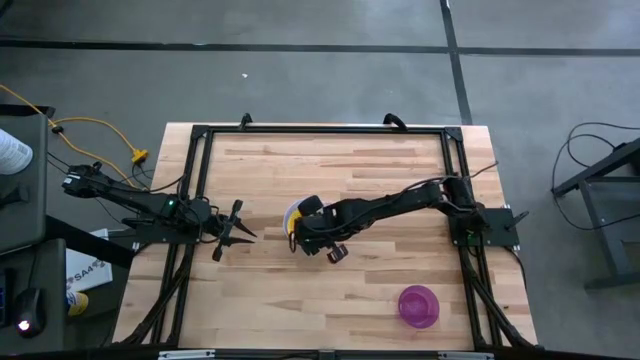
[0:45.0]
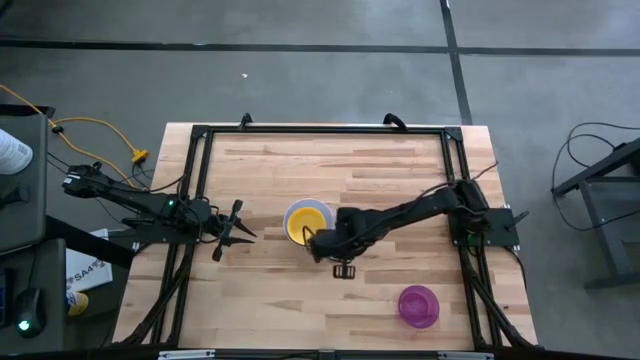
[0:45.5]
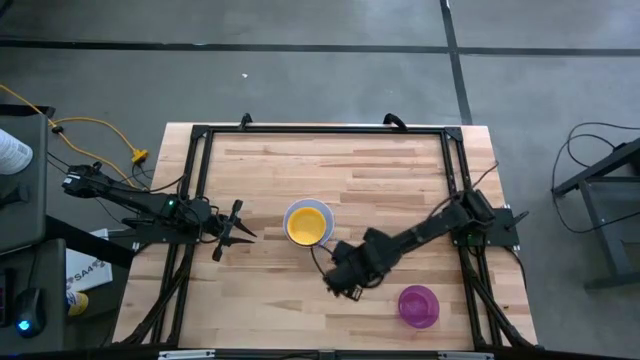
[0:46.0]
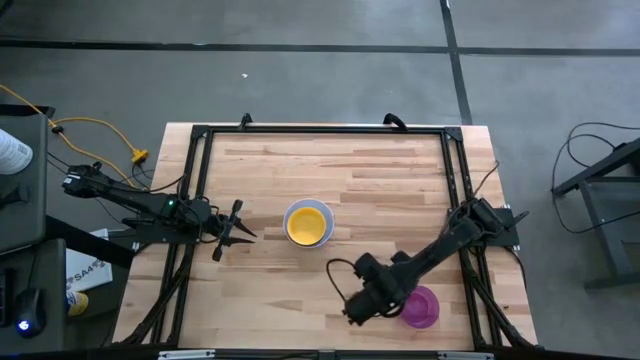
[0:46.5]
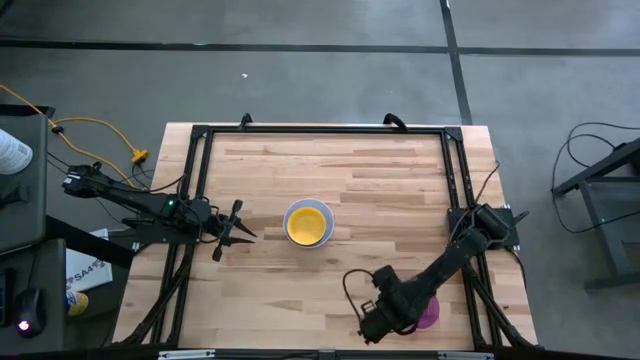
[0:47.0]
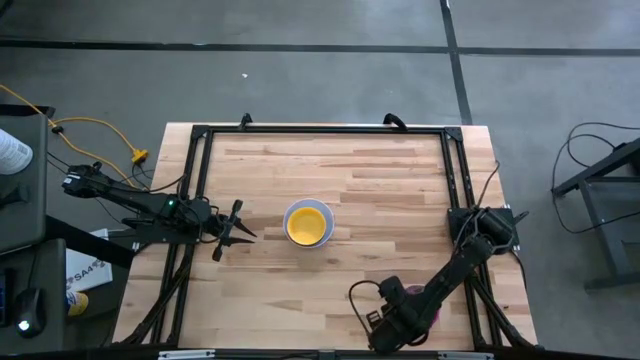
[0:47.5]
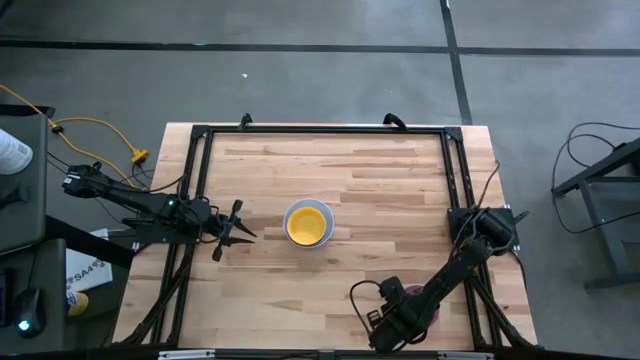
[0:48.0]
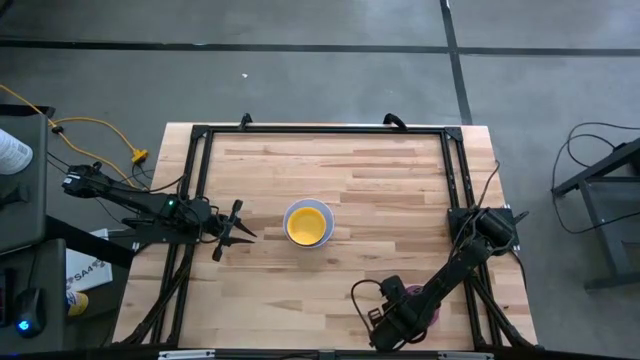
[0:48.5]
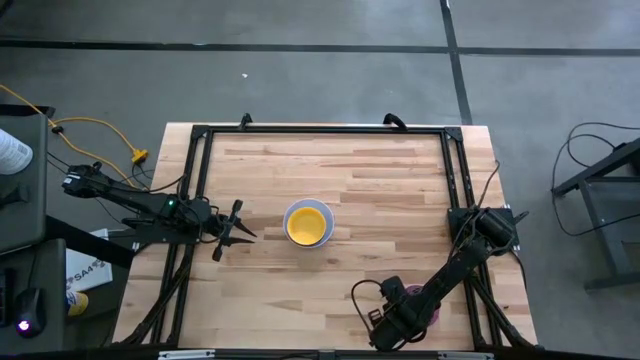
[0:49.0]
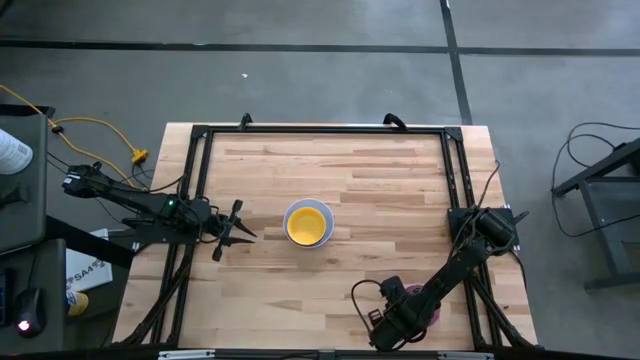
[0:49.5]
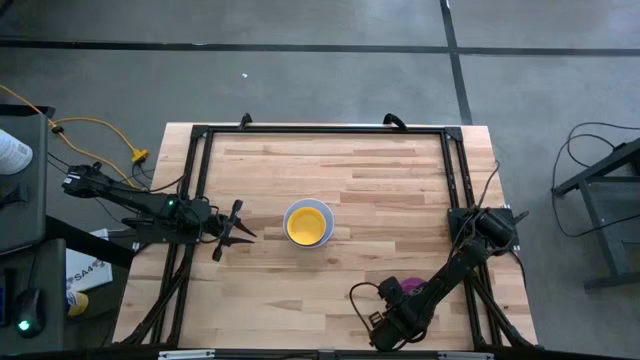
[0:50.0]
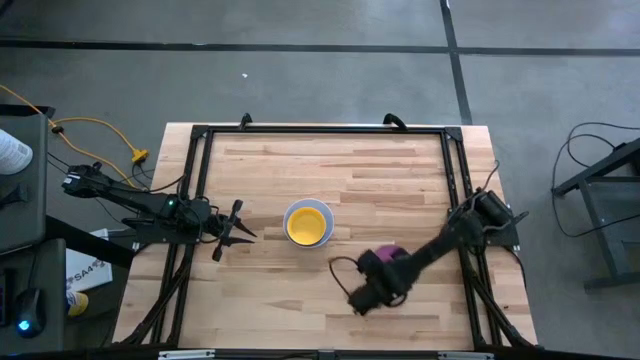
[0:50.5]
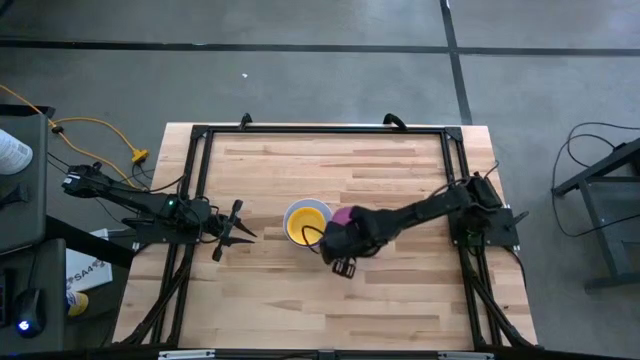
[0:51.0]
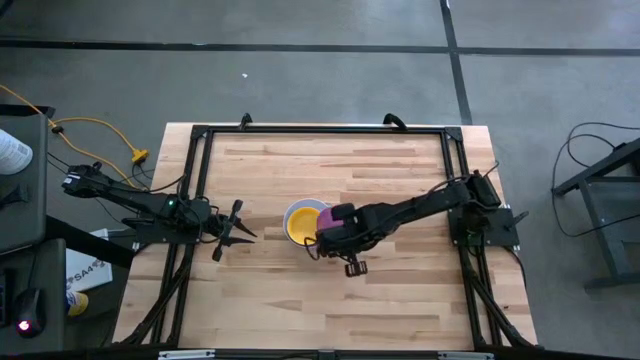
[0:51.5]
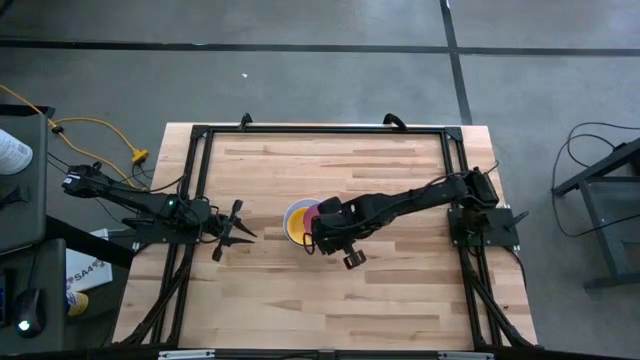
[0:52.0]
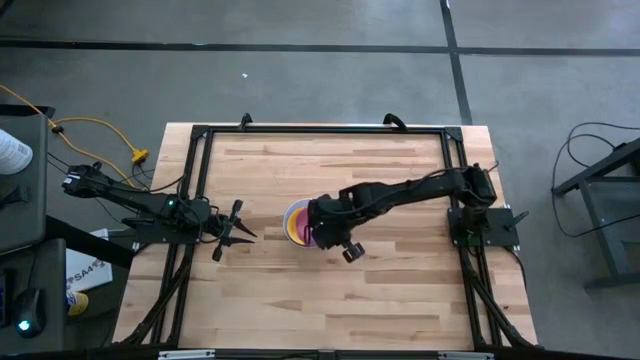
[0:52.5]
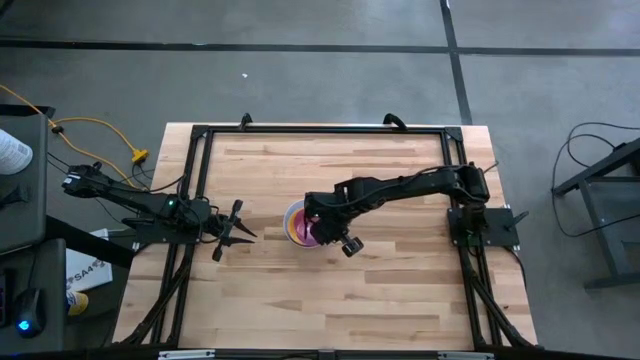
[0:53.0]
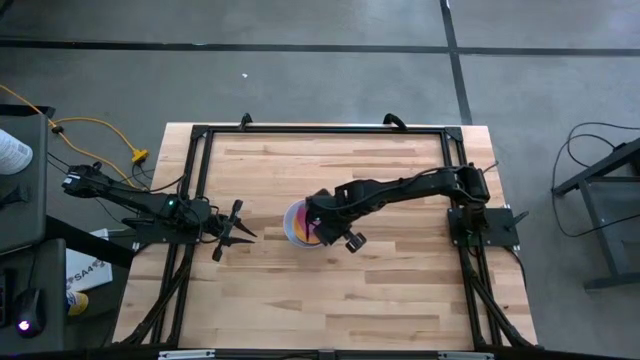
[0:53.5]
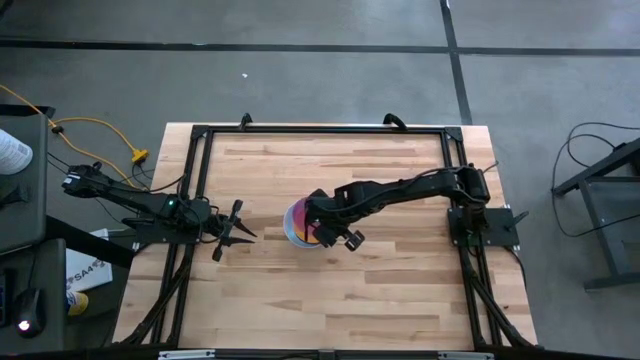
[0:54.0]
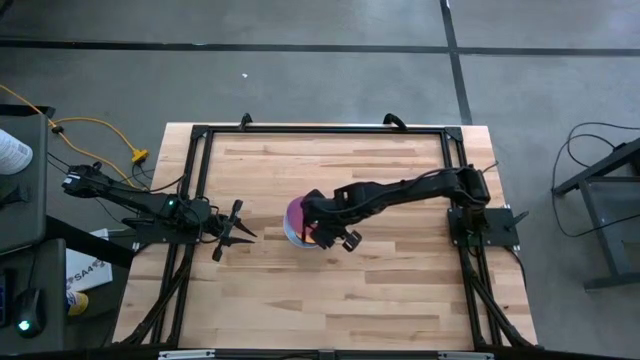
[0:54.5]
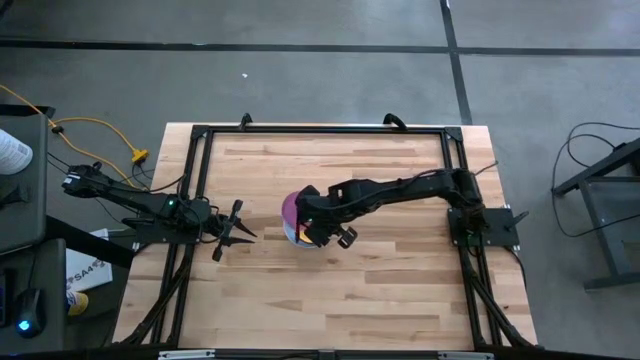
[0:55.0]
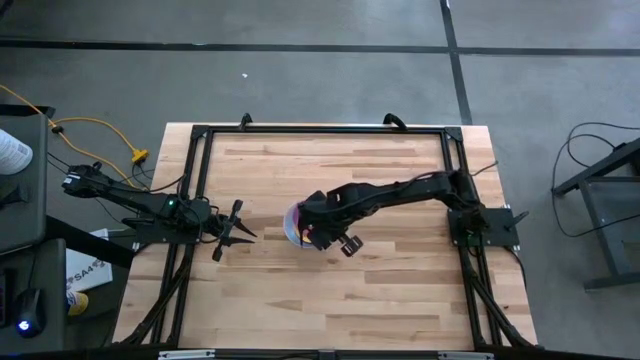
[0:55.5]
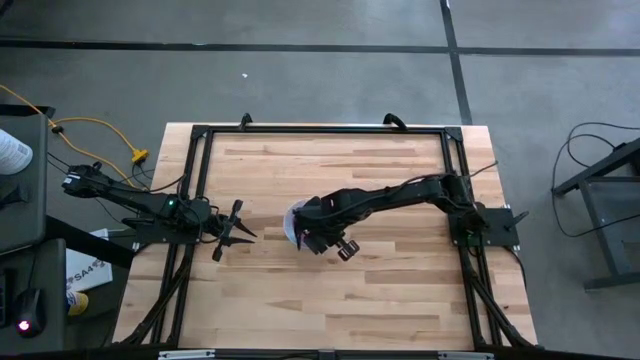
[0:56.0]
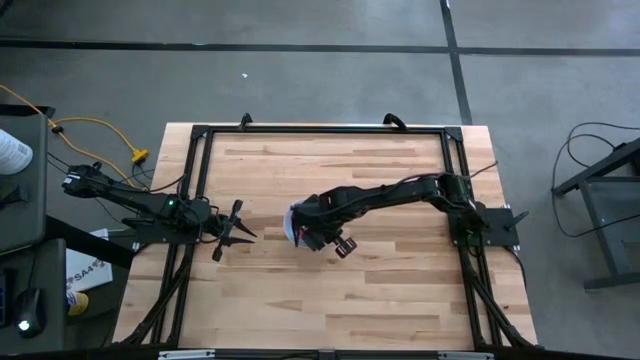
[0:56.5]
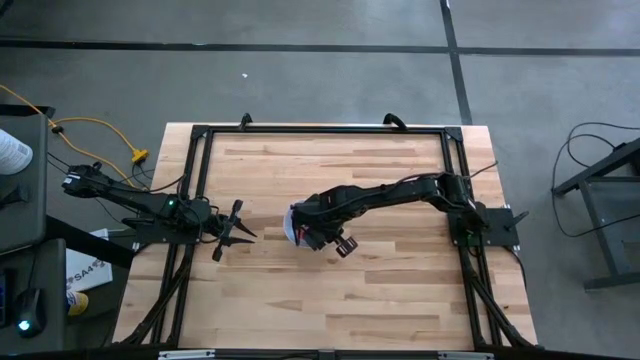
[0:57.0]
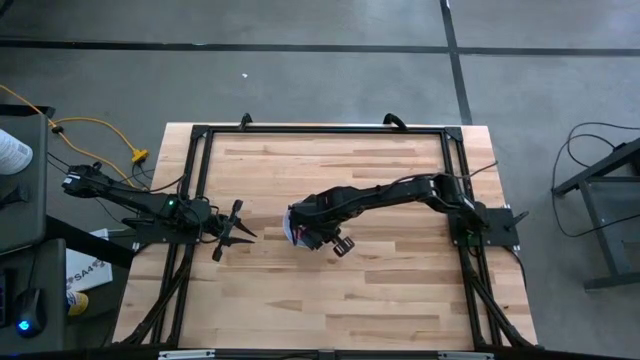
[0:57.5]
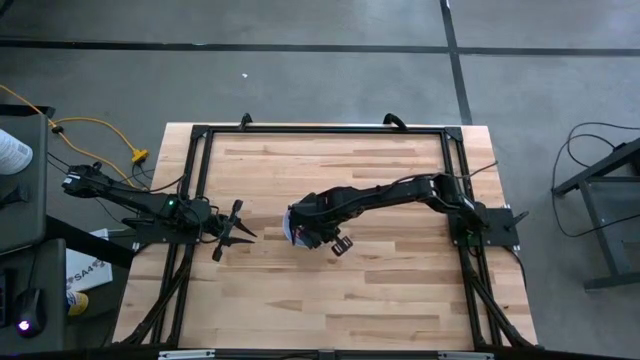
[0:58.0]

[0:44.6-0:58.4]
Stack the purple bowl on top of the yellow bowl

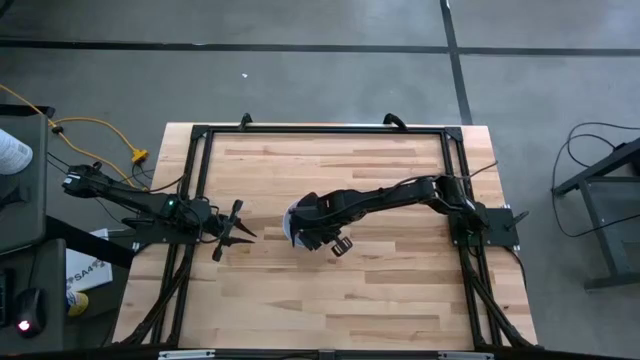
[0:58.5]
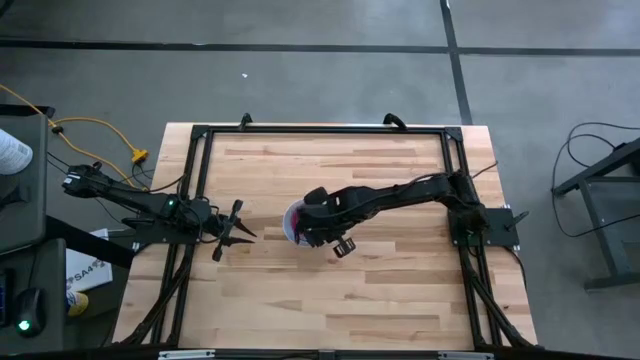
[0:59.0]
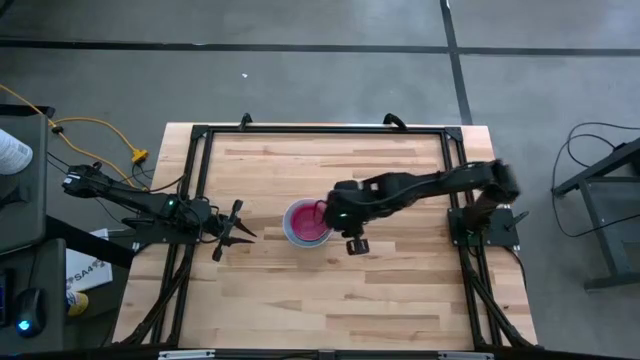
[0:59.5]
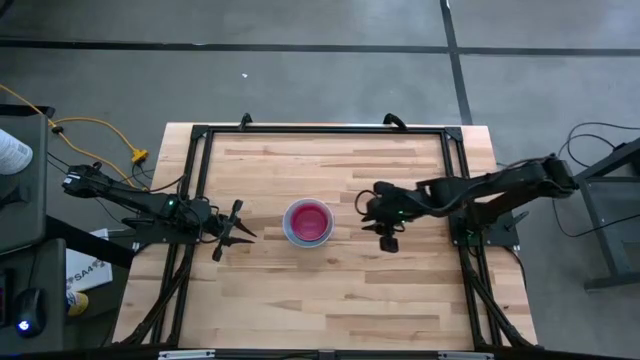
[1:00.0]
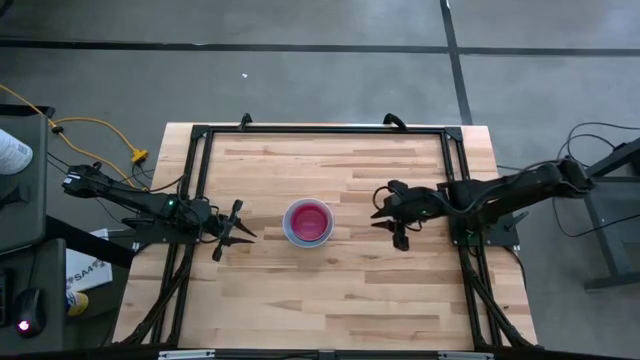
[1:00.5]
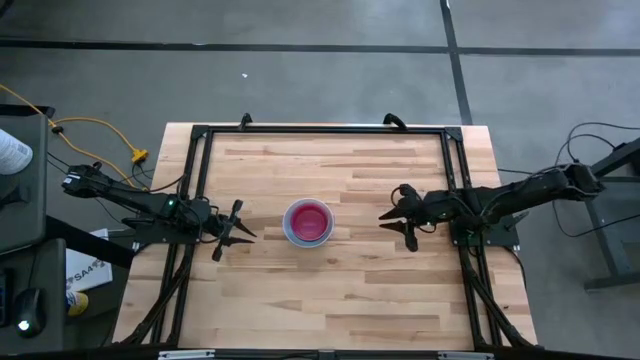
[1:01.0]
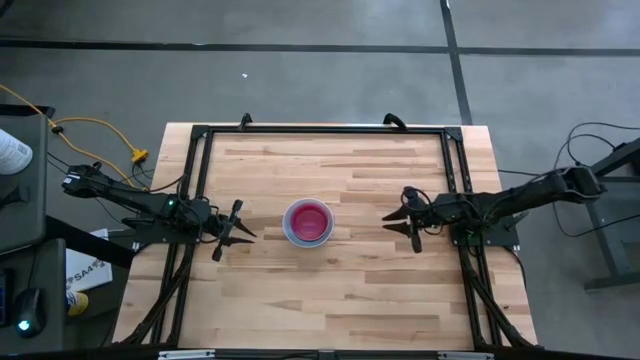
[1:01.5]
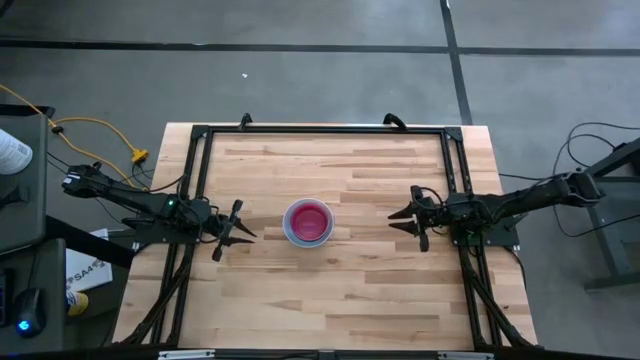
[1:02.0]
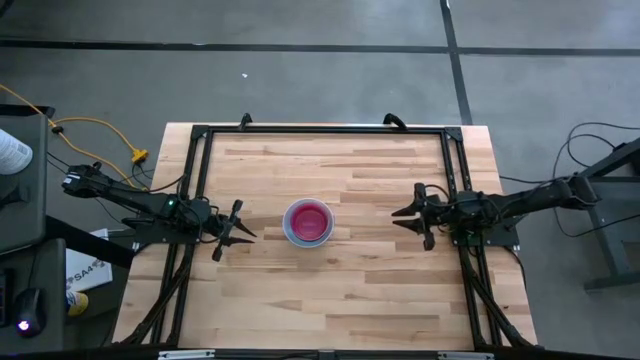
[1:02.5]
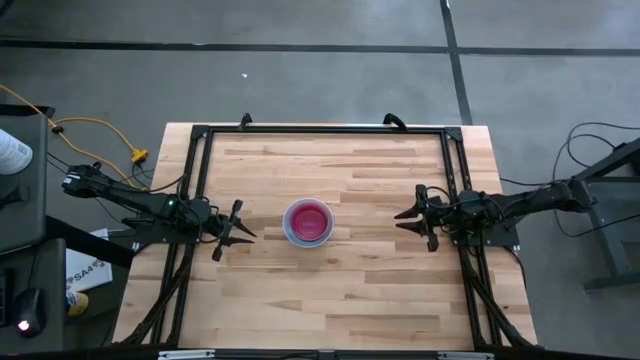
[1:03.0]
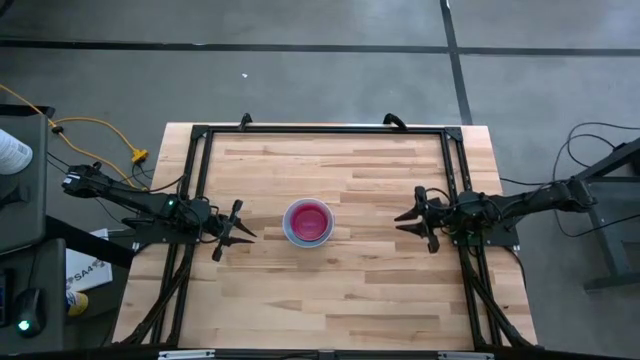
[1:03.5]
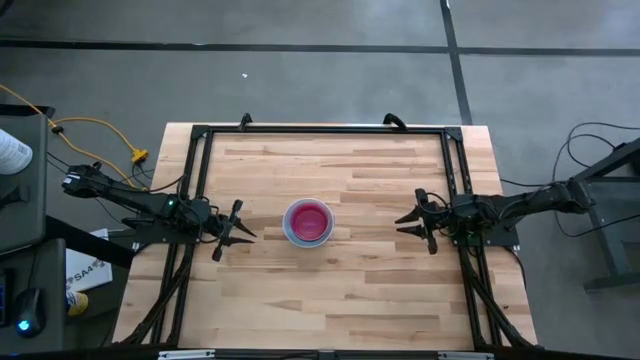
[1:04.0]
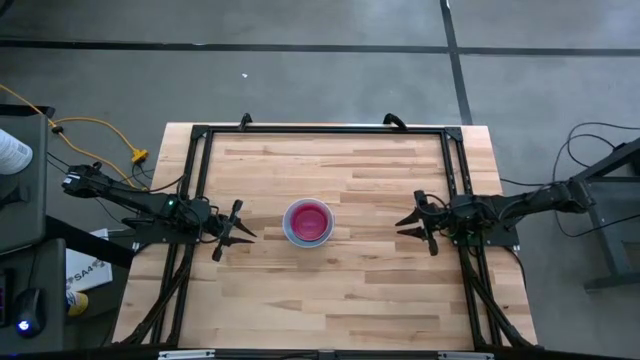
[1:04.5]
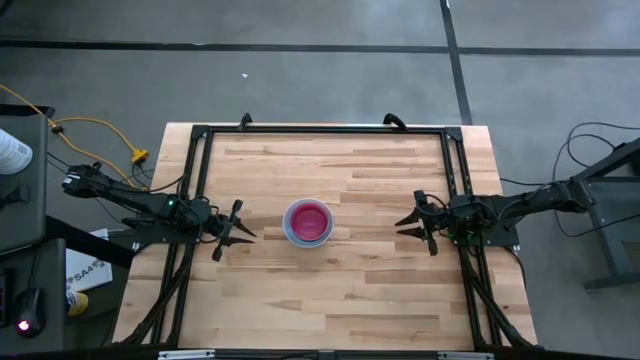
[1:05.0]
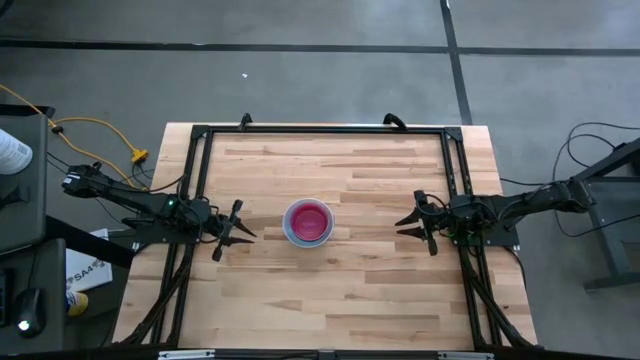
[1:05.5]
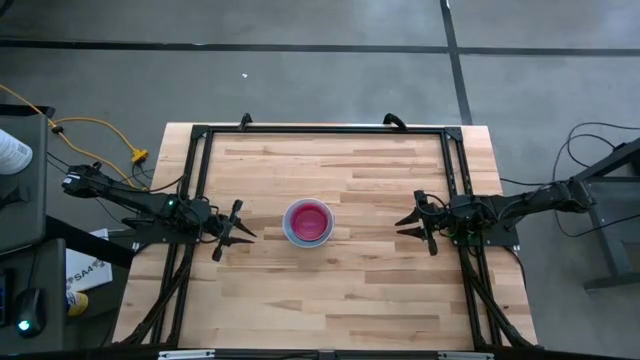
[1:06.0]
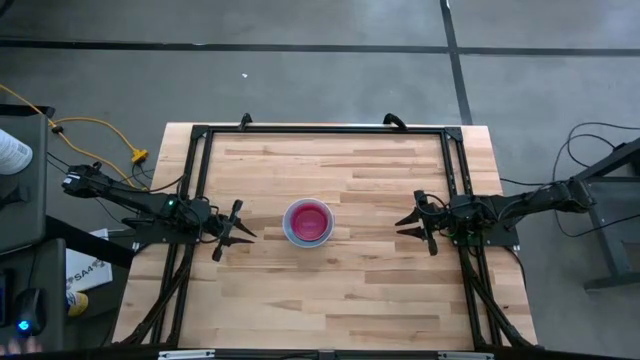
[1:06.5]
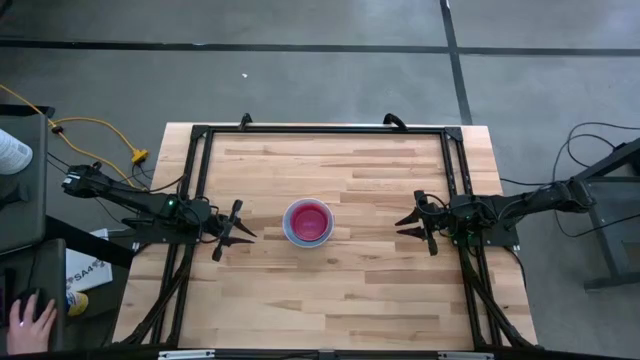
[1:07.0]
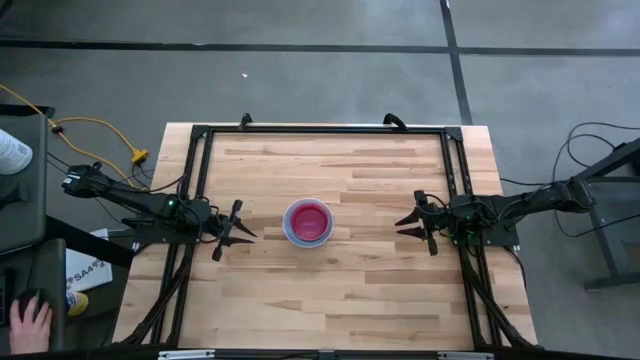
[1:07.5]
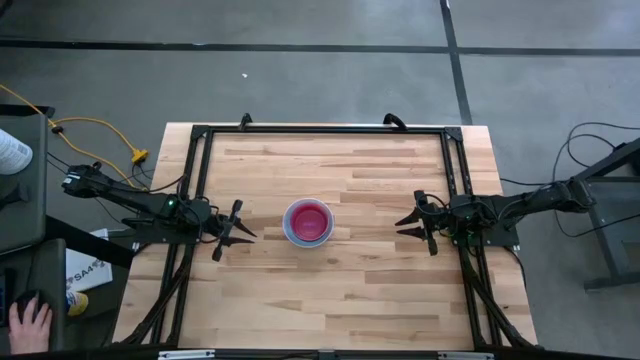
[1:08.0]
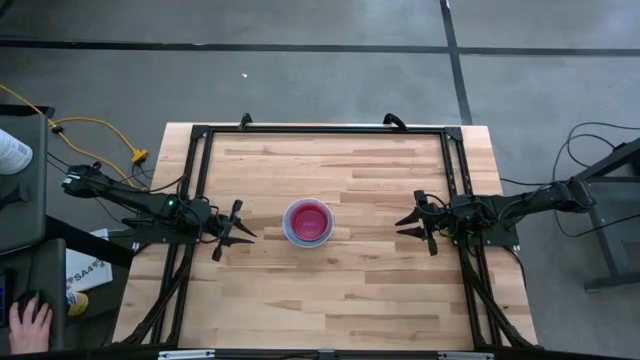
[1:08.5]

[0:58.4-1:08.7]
Return to Home Position
